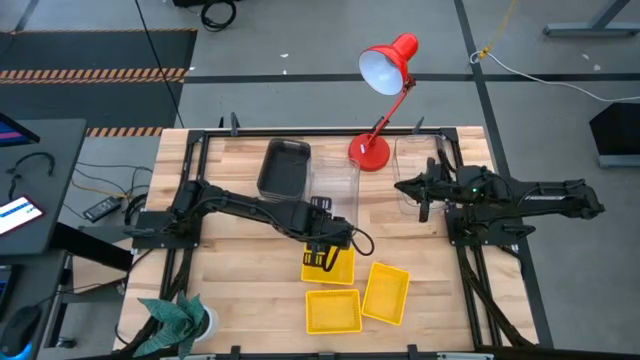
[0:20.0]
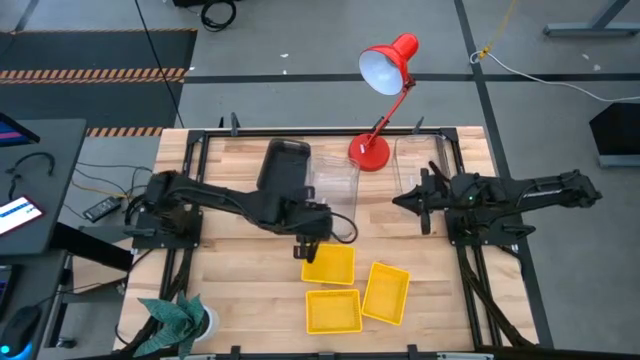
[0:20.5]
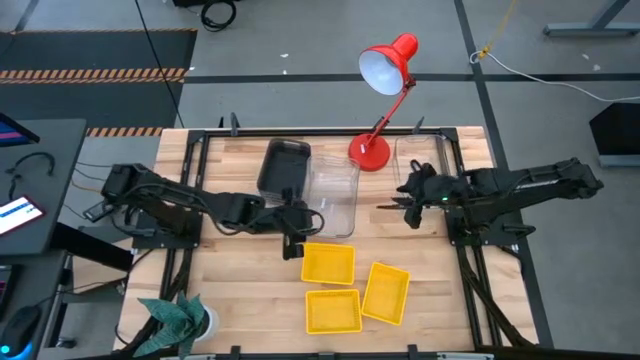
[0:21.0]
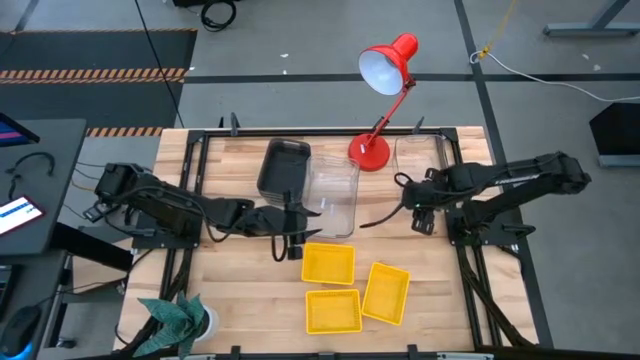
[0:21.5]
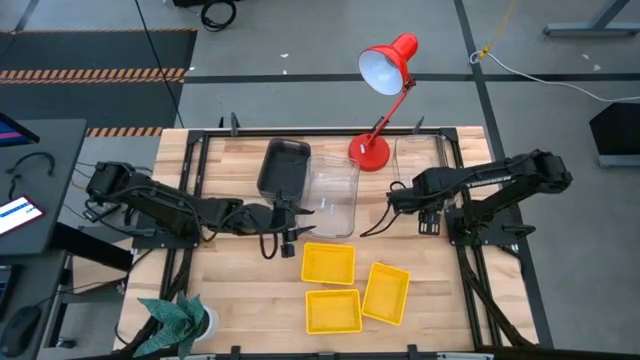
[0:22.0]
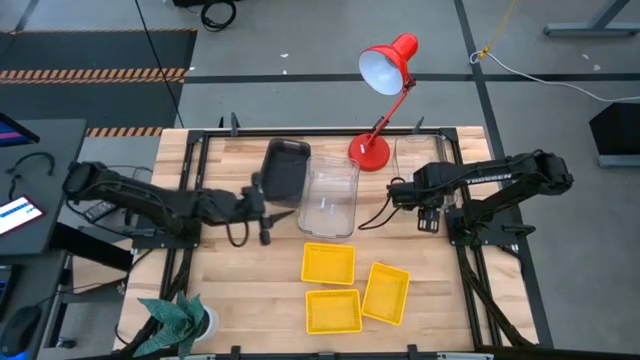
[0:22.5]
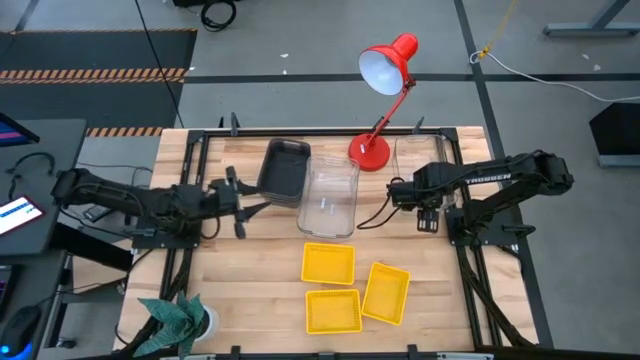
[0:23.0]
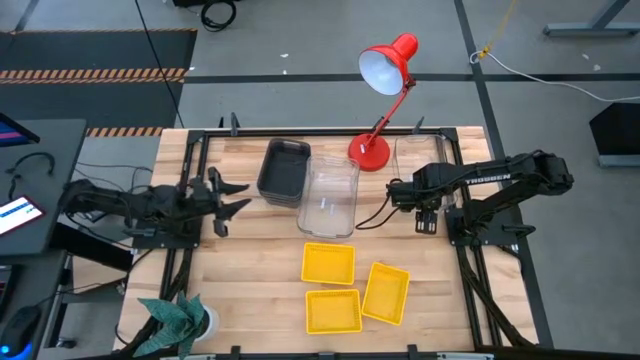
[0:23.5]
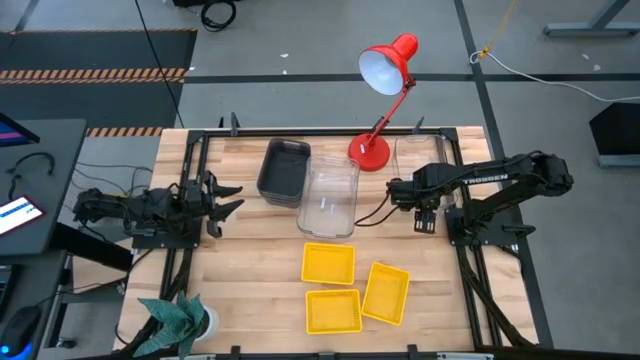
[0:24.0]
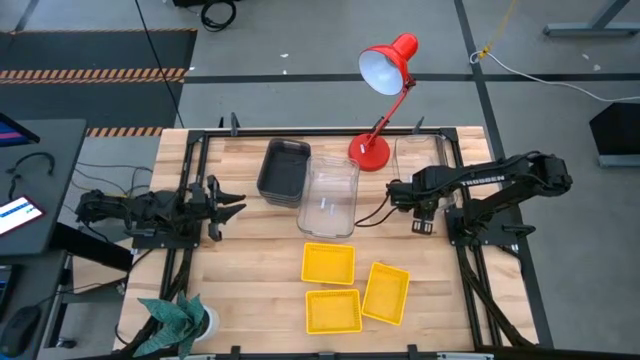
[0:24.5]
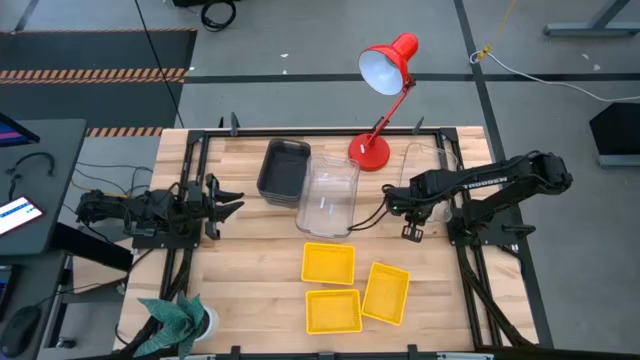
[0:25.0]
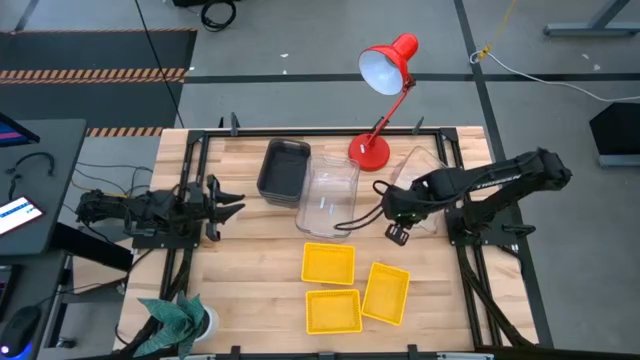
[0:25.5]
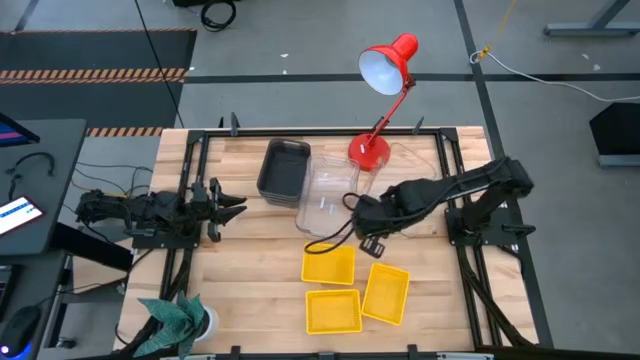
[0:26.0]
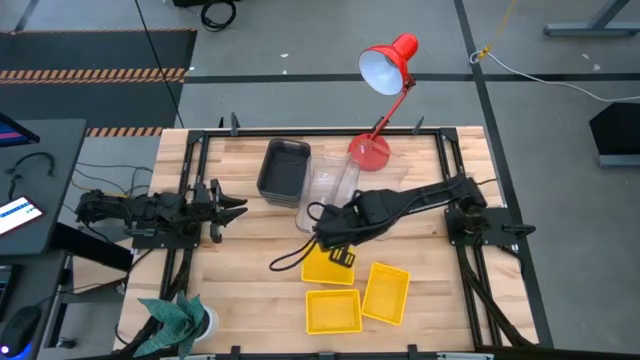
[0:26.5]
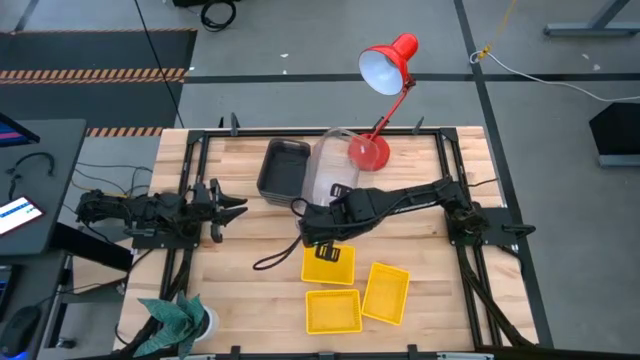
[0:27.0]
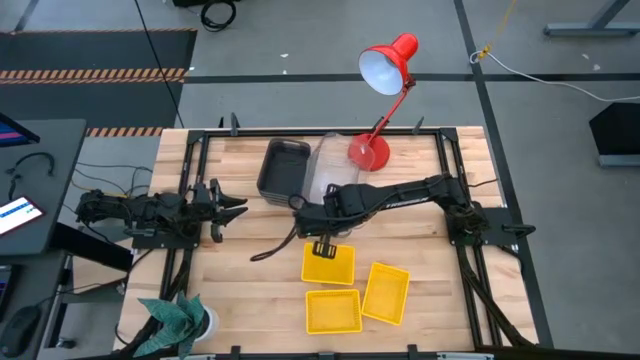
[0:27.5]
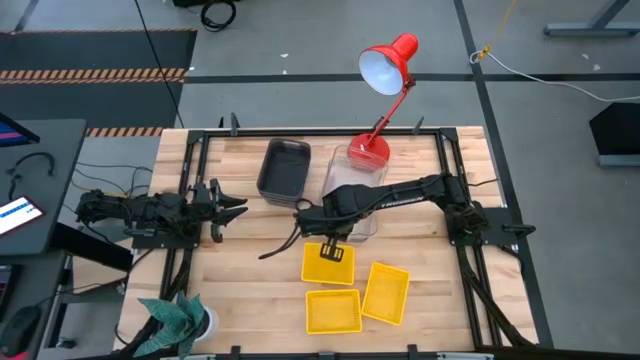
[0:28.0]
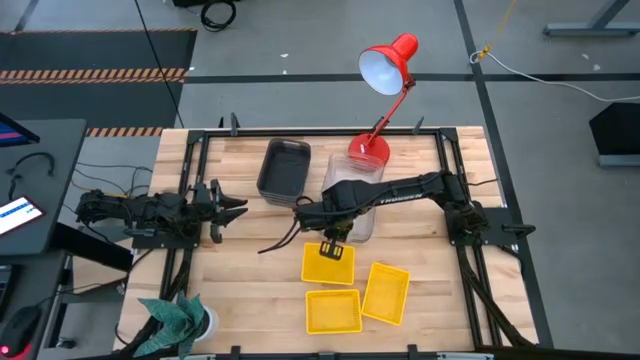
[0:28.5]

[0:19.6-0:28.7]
Stack the top transparent bin on the bottom transparent bin

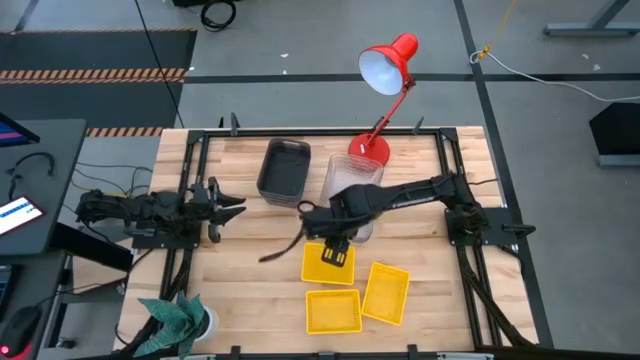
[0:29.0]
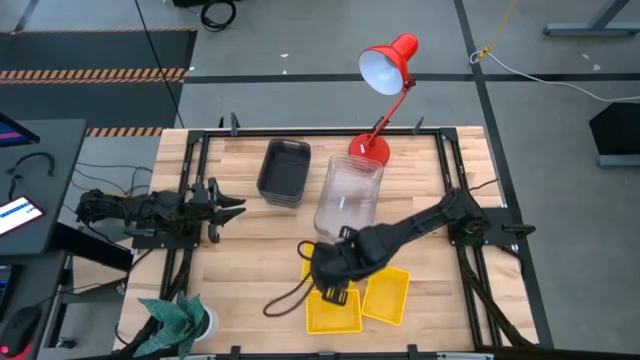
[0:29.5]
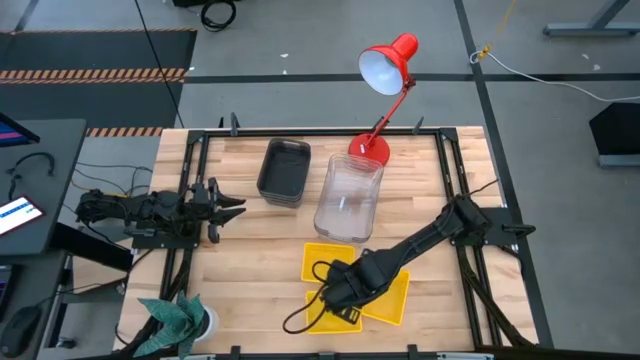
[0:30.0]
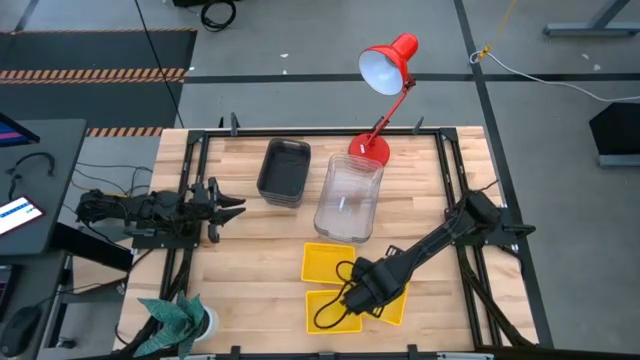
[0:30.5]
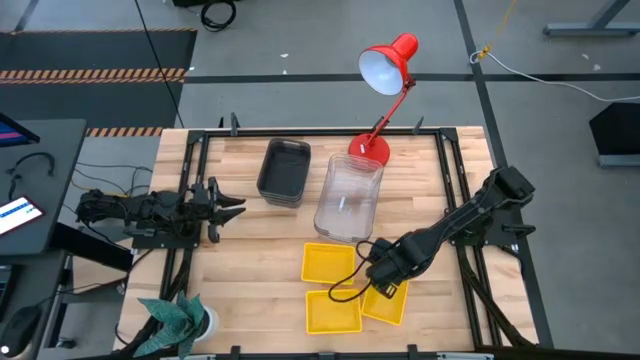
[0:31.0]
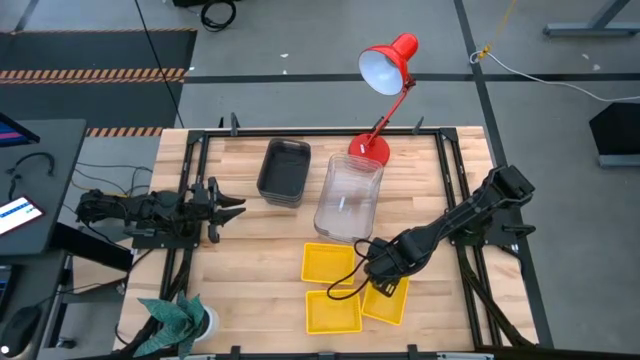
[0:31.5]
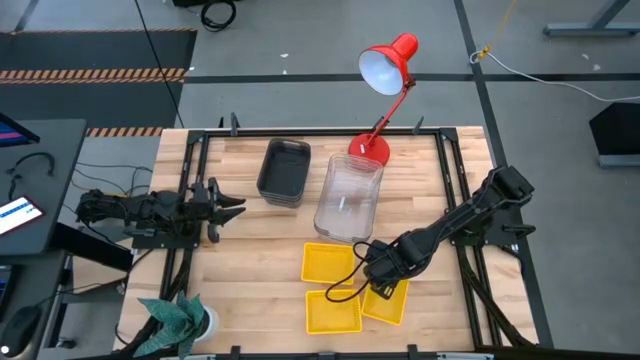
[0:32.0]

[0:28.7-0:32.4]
Stack the right yellow bin on the top yellow bin

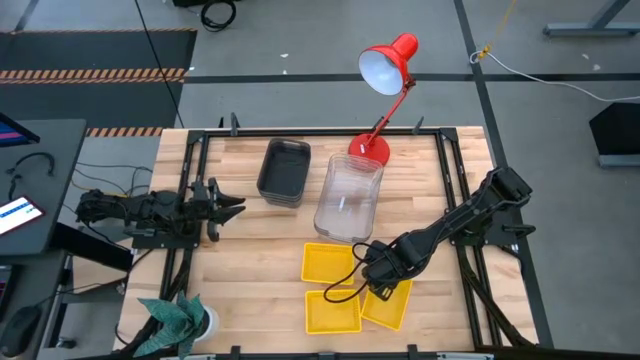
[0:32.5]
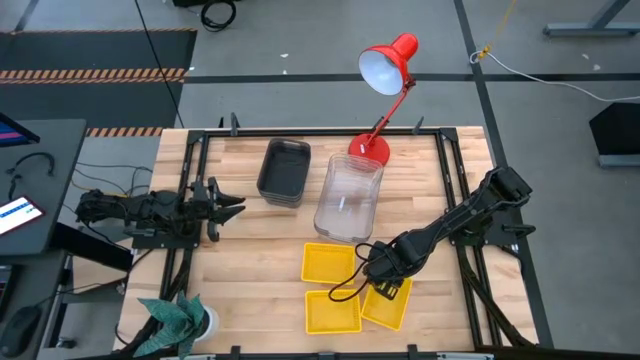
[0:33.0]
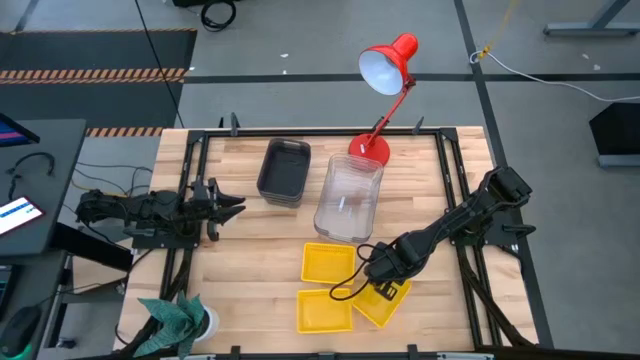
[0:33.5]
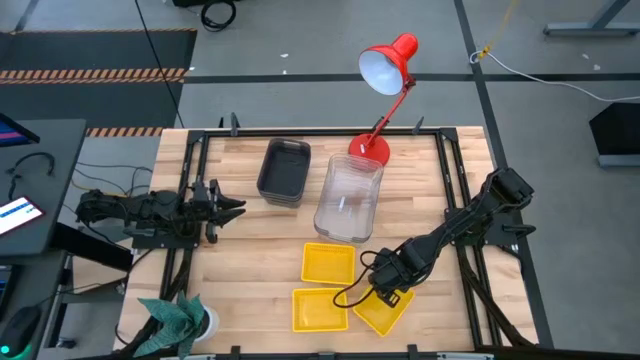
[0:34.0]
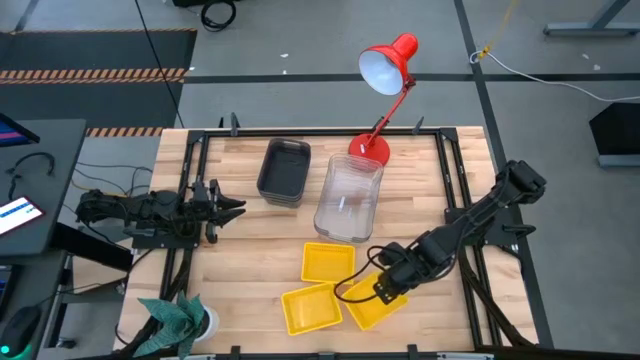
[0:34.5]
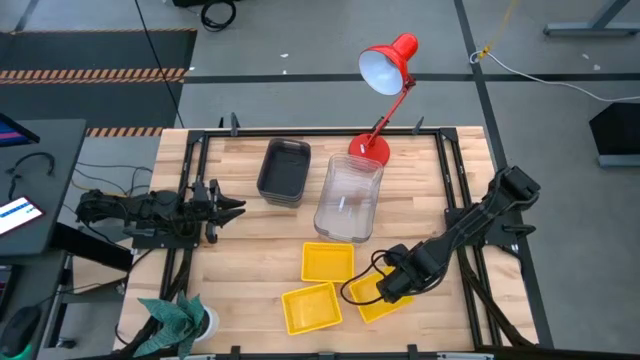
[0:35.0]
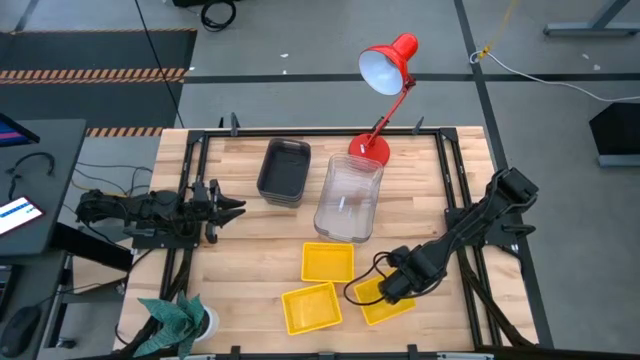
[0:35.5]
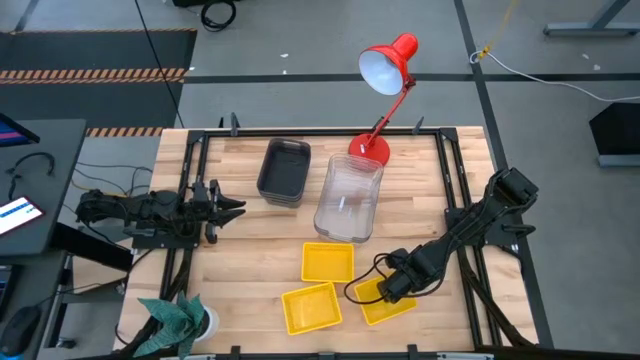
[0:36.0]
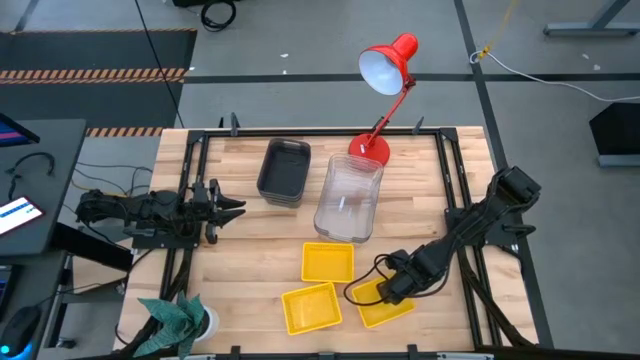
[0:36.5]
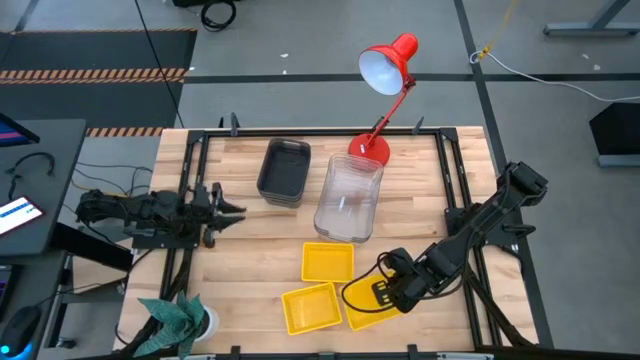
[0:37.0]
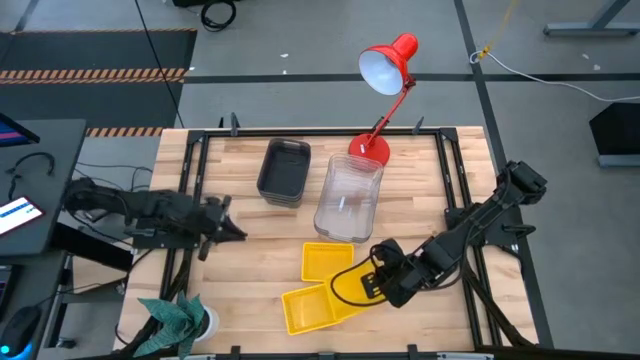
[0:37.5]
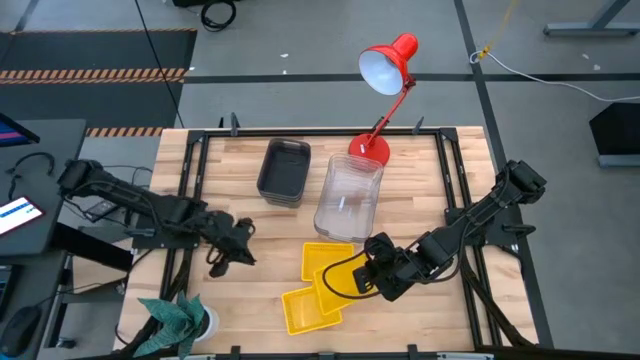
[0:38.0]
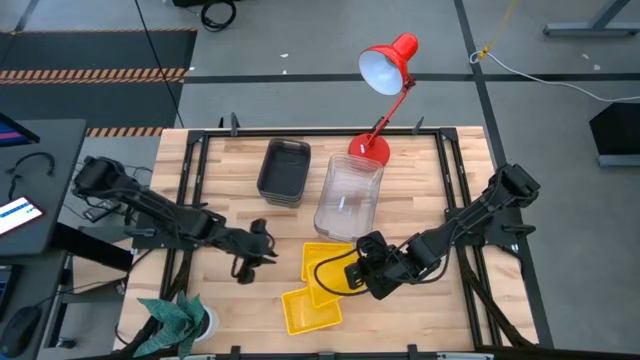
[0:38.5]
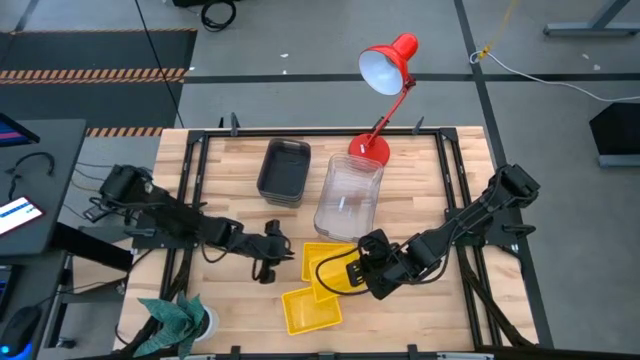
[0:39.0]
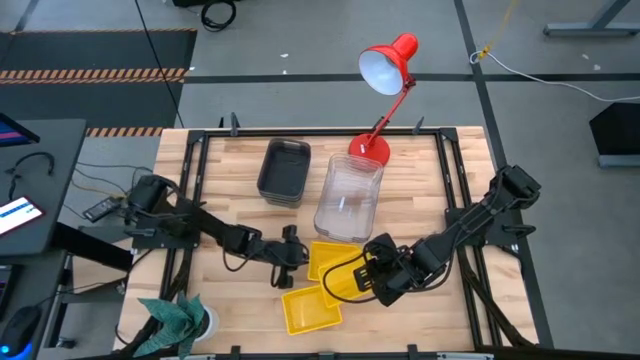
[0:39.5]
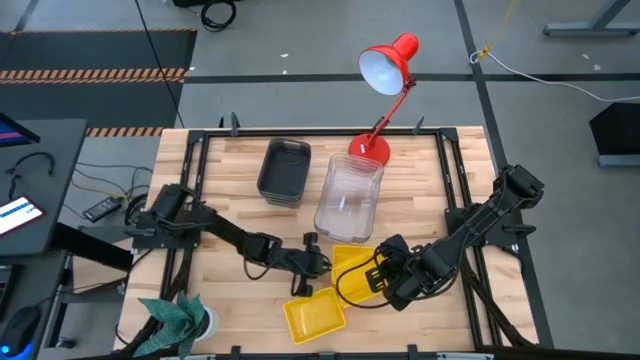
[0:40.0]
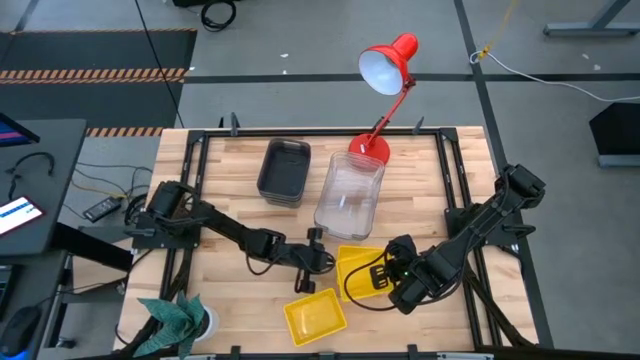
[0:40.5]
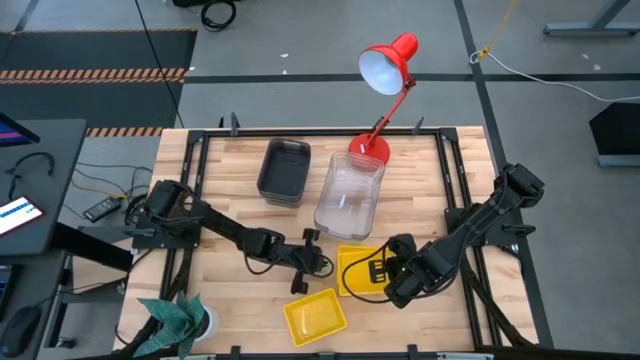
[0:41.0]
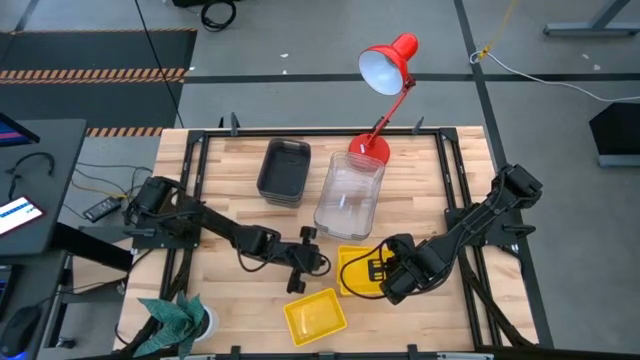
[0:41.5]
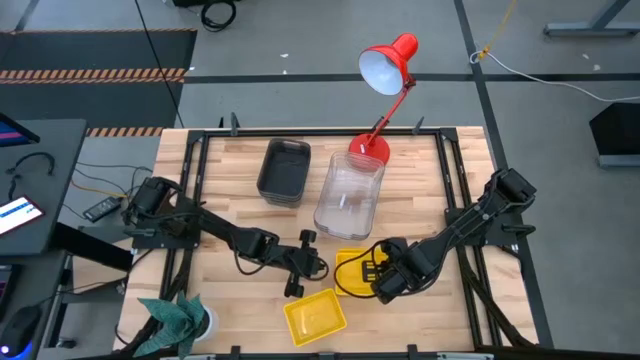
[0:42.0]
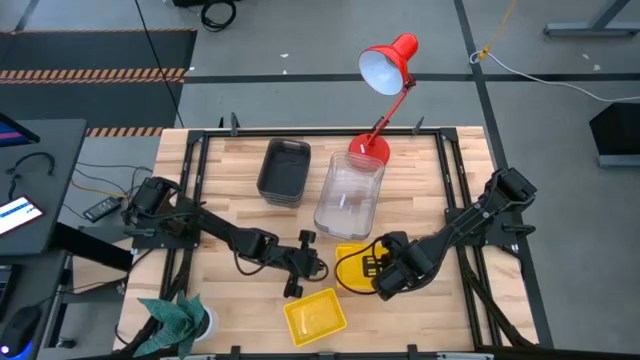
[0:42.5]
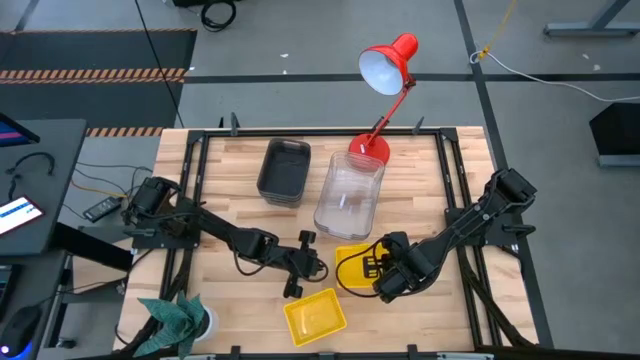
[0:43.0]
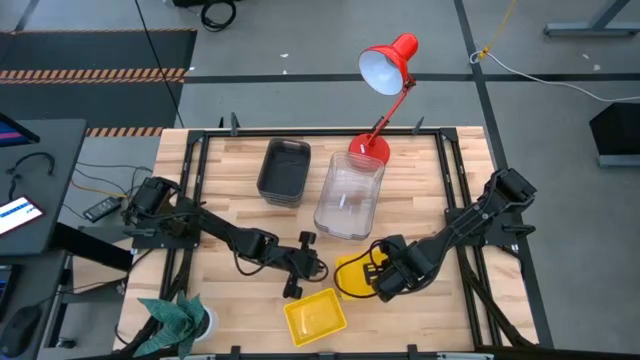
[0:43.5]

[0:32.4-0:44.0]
Stack the right yellow bin on the top yellow bin
